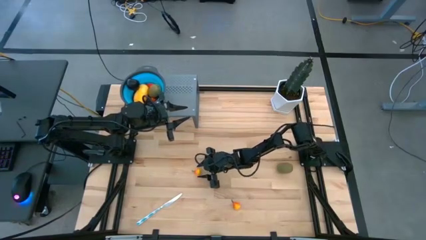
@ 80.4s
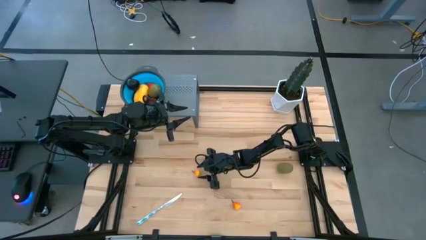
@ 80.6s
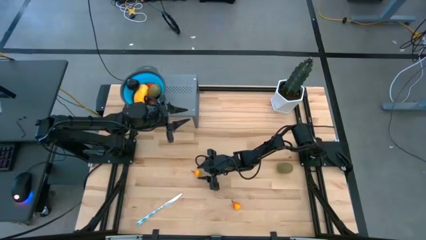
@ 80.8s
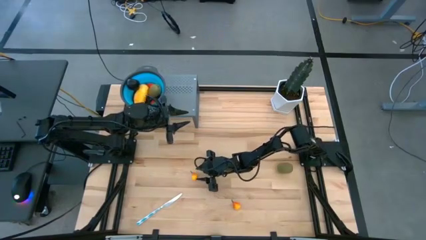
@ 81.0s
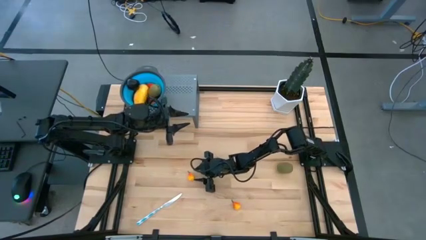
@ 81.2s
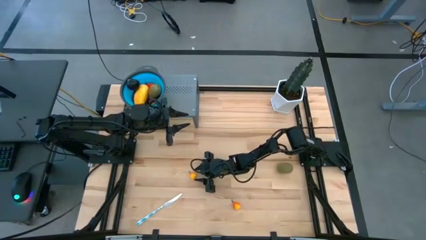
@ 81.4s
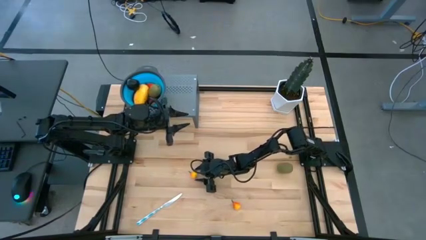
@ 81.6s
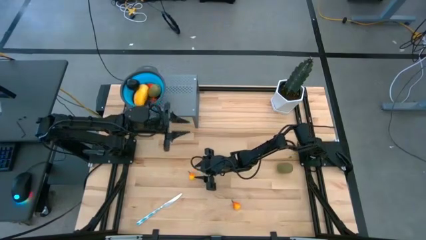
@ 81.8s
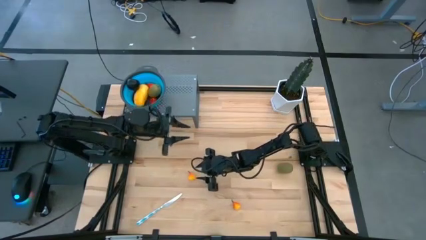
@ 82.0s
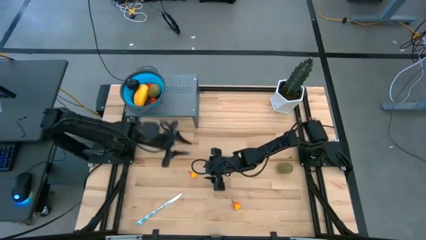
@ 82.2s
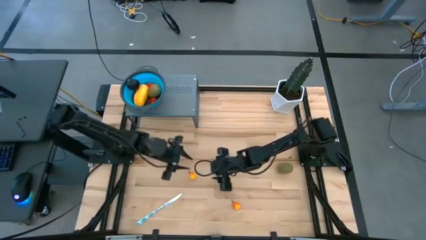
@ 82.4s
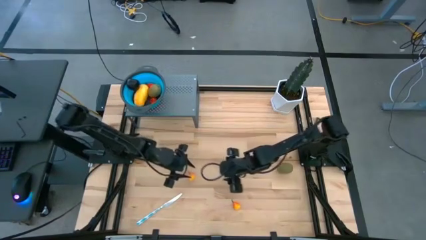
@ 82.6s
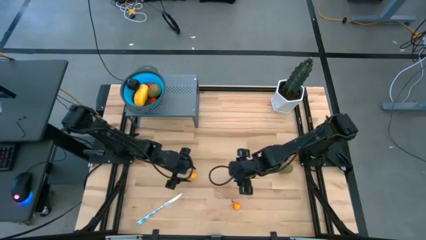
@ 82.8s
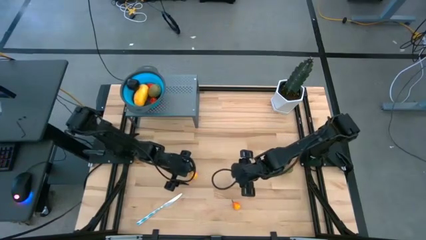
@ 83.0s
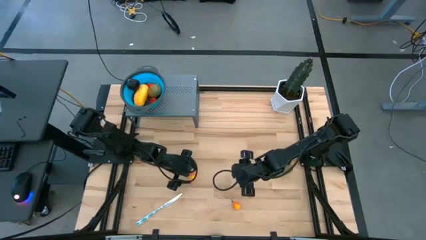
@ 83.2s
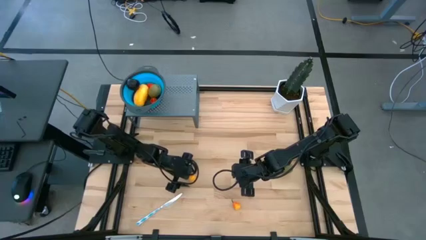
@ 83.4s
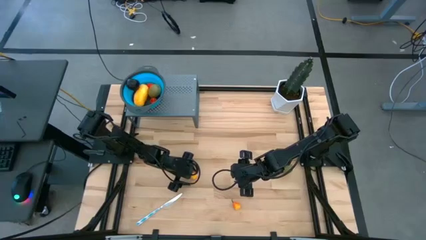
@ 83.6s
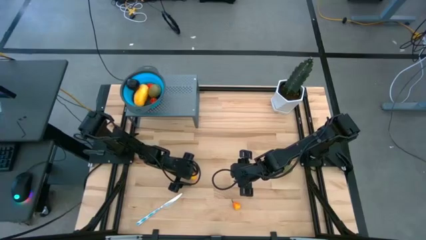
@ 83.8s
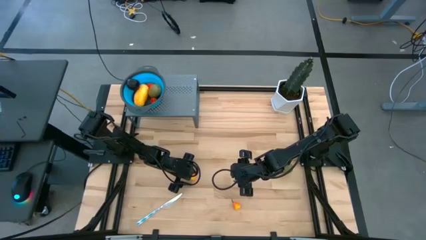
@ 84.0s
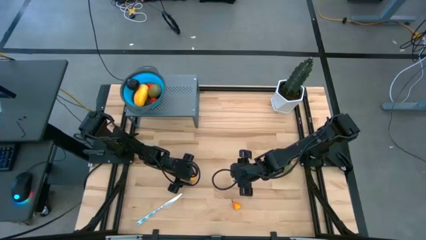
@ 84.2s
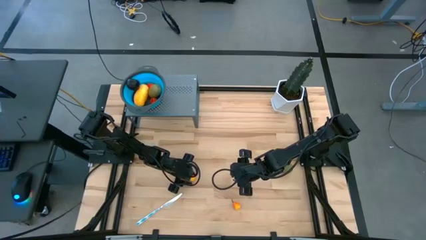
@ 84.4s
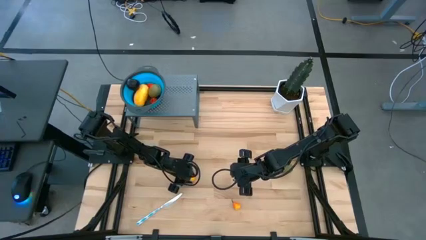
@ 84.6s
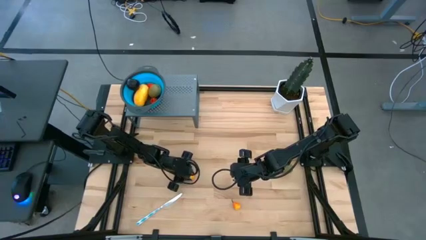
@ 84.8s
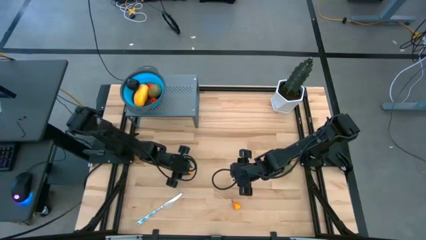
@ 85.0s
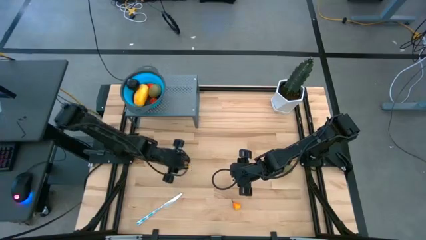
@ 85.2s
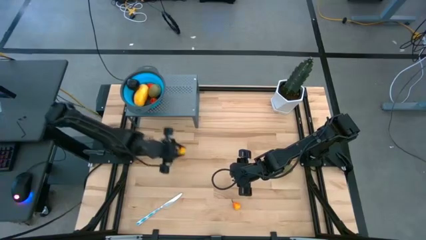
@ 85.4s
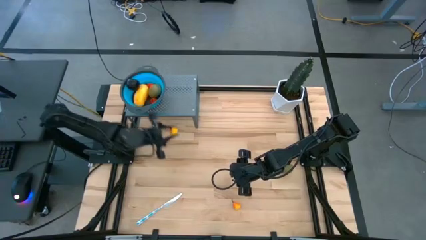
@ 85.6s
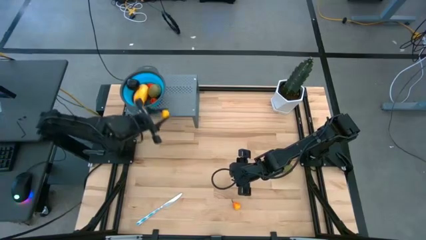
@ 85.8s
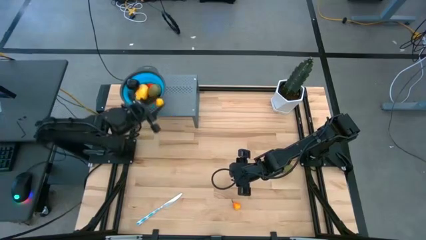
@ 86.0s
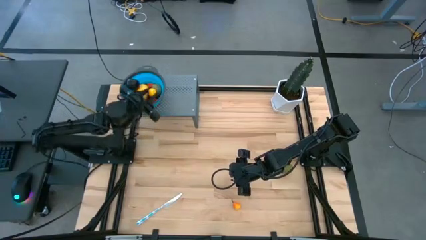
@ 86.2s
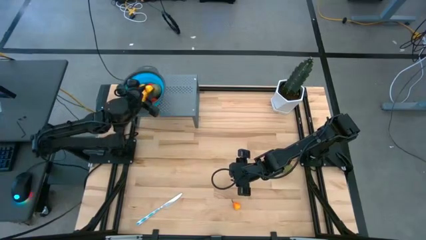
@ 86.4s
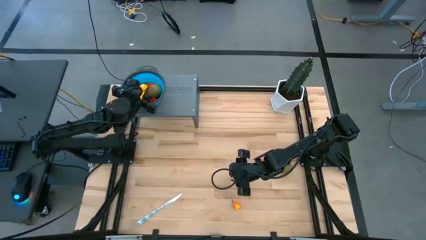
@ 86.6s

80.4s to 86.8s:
Task: Pick & Place Fruit
Put the orange pear into the blue strainer bowl on the shelf

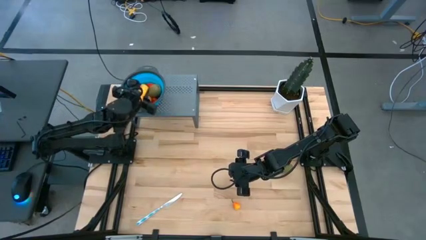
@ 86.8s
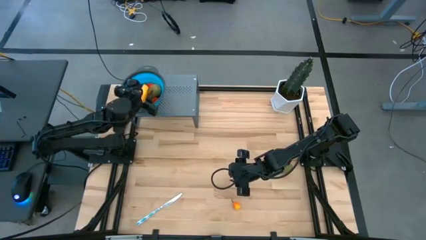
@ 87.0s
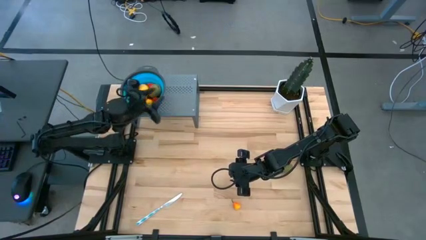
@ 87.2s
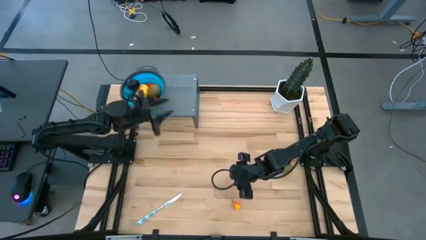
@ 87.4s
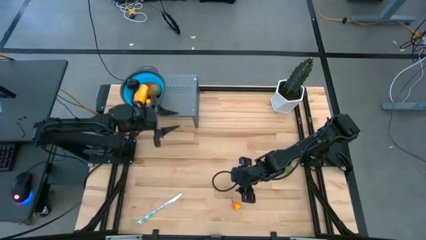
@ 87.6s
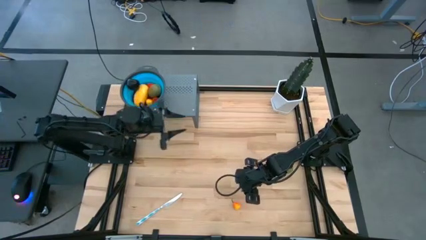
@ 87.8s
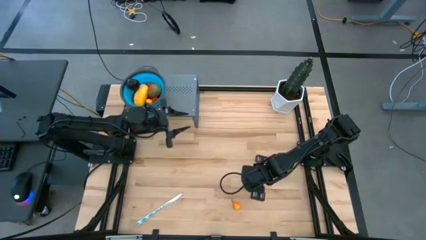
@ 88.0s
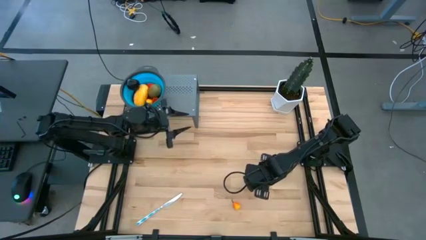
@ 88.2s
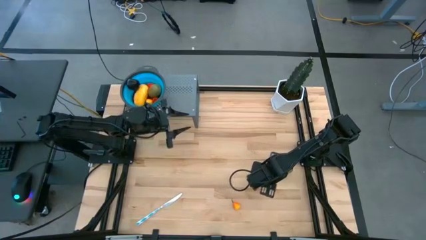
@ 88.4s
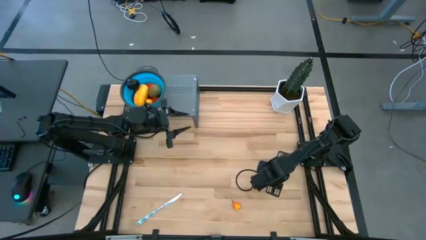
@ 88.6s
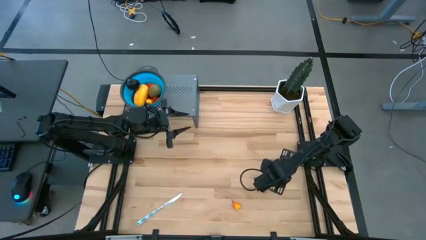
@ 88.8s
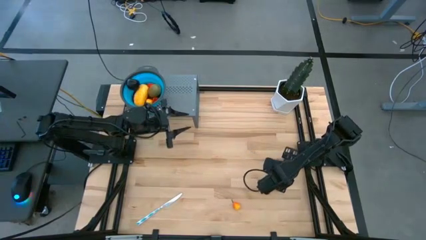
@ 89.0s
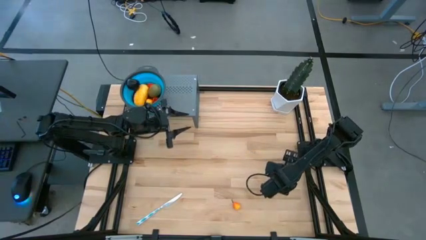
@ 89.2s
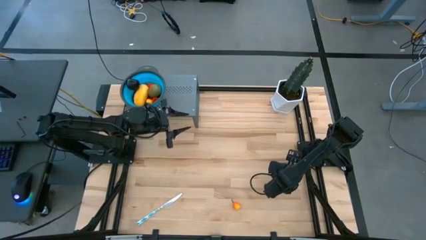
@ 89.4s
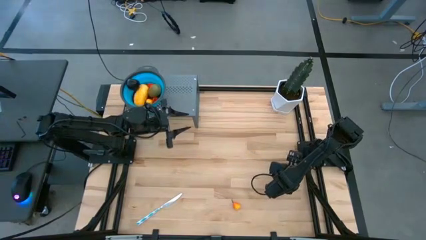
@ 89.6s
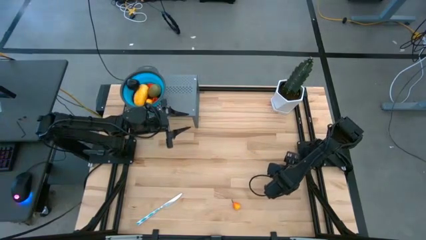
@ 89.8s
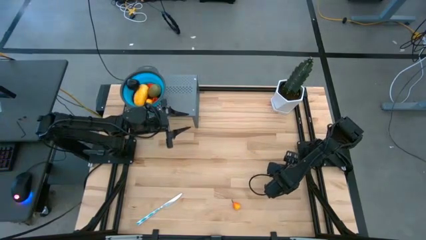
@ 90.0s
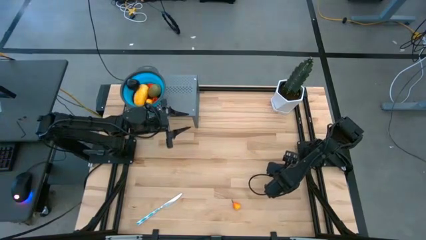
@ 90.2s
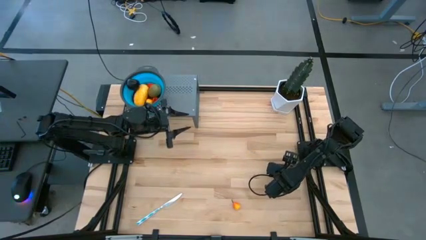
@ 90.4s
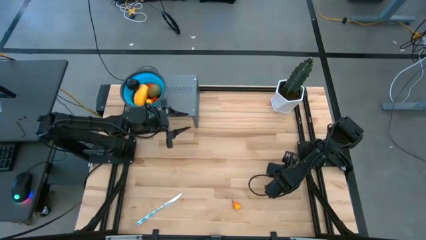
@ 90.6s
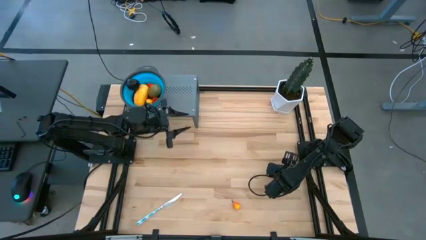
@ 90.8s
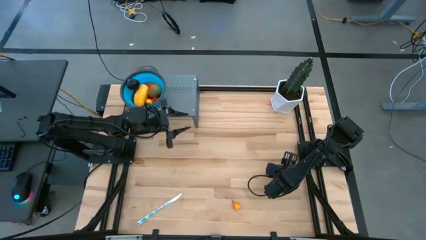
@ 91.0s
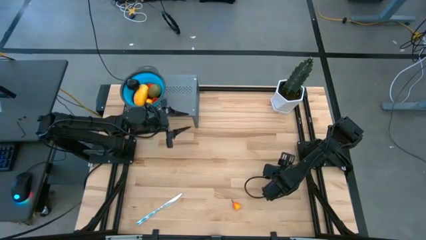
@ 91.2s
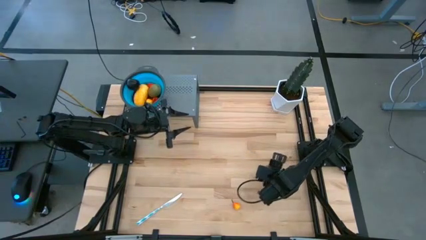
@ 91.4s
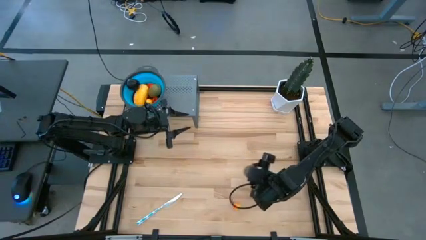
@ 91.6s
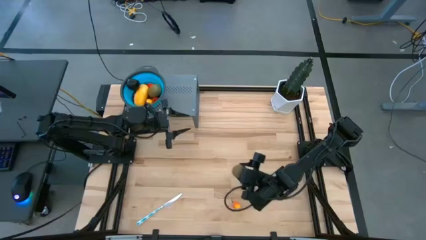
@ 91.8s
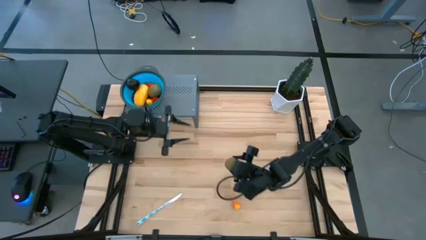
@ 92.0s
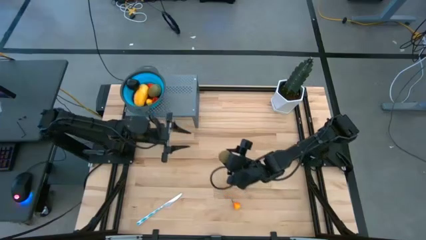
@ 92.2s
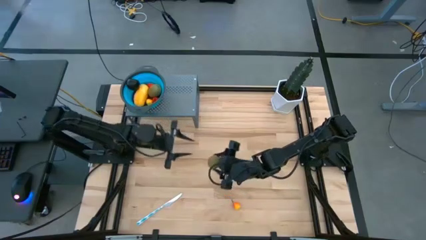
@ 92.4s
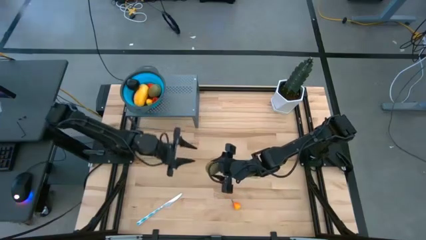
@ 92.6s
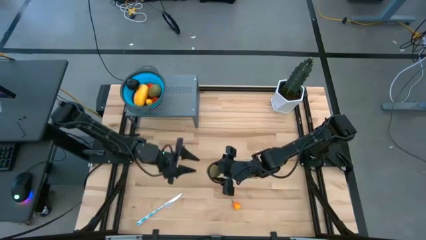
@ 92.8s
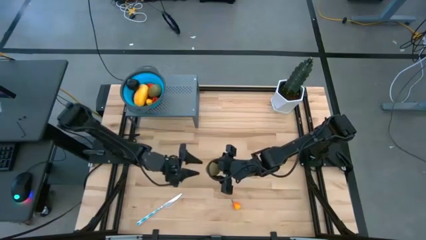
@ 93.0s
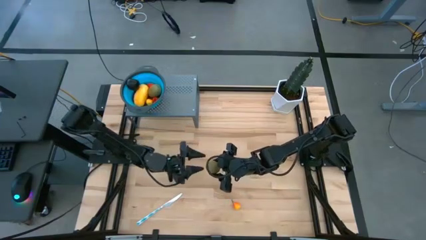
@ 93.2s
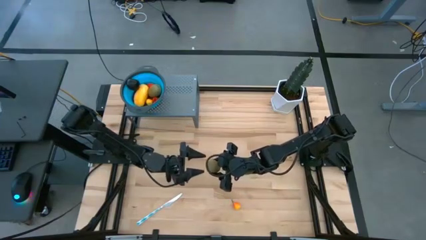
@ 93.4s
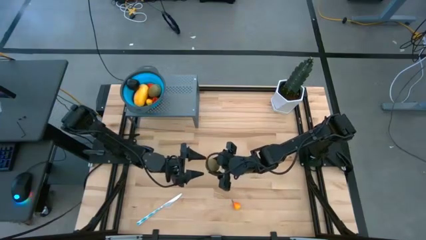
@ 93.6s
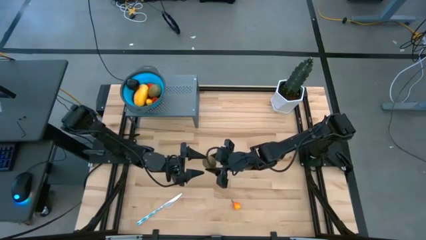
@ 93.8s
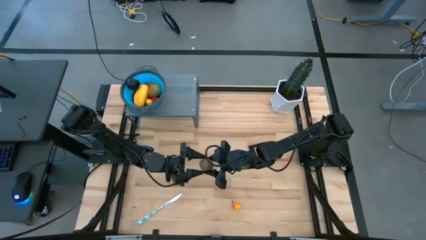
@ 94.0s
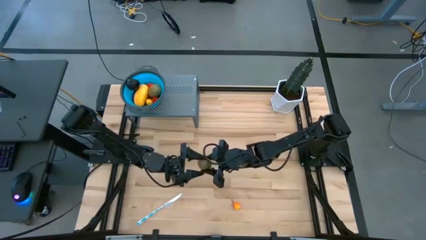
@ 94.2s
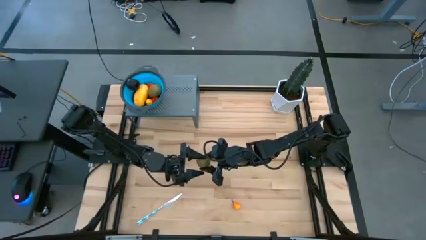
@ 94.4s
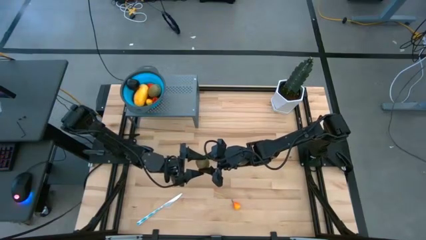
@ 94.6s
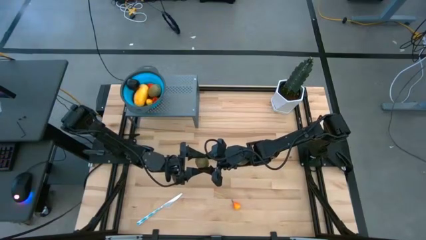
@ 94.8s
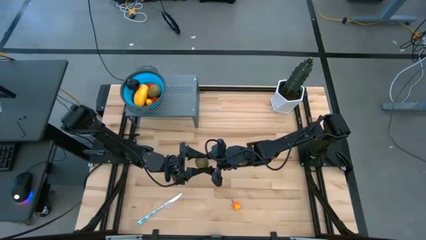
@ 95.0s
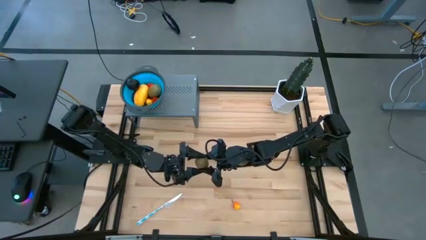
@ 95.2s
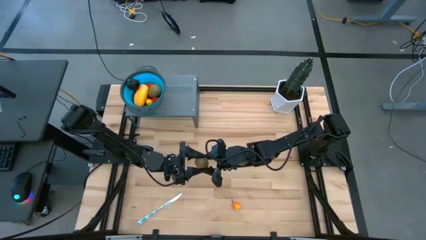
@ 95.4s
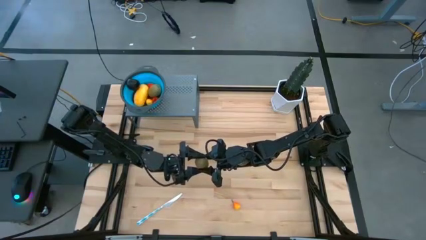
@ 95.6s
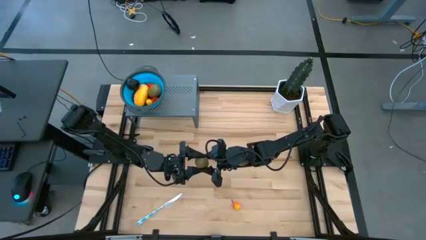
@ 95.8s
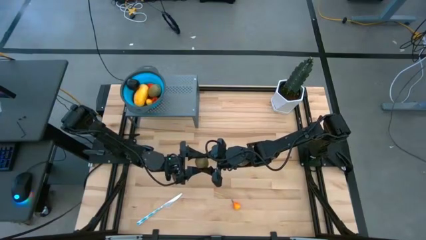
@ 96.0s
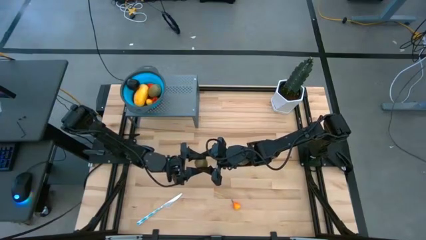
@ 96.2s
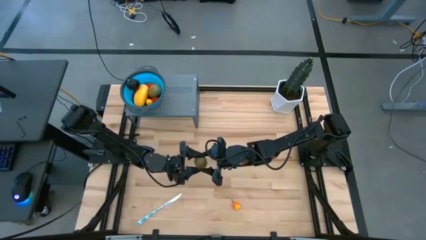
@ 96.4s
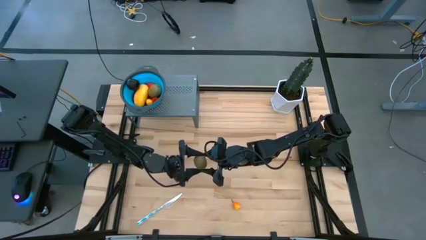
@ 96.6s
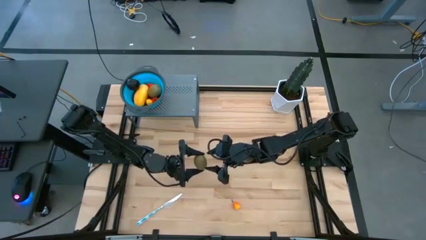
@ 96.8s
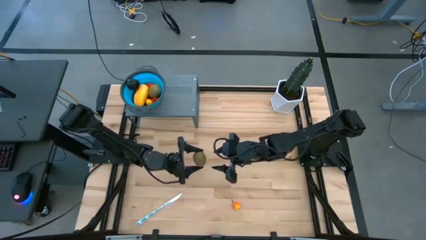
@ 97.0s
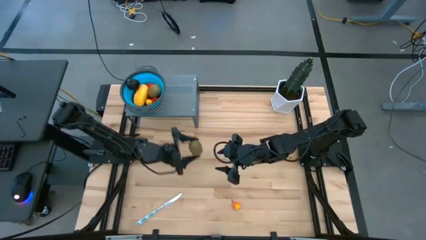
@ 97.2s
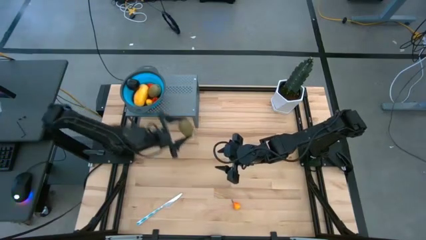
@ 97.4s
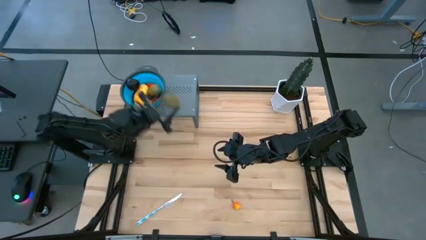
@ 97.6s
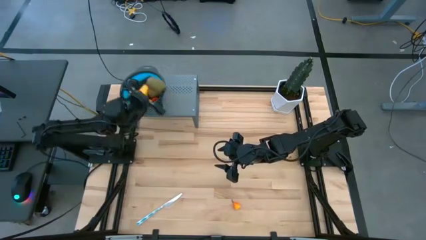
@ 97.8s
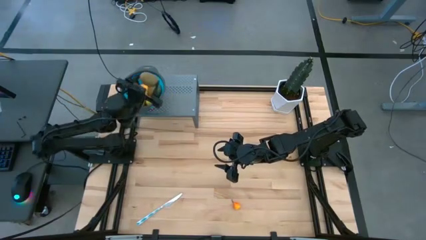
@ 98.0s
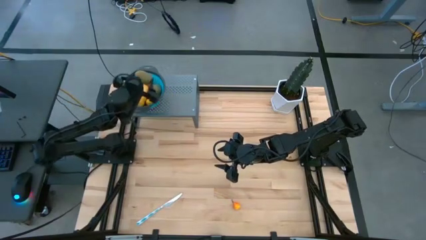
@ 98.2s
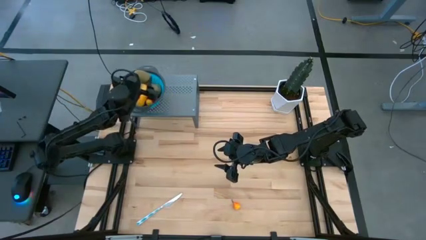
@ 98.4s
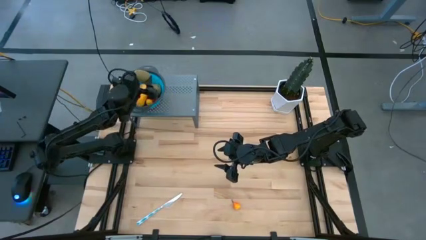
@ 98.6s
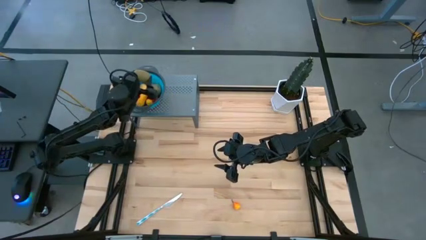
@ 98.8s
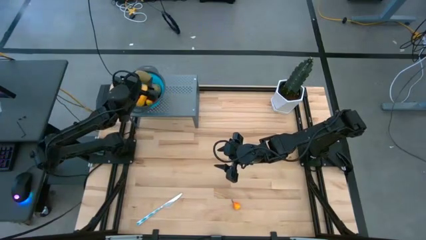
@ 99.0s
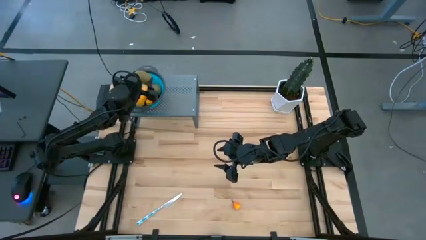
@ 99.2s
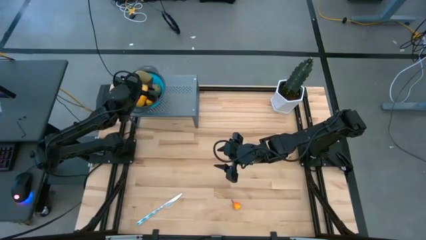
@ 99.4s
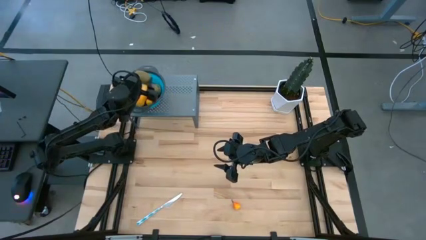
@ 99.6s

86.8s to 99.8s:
Put the brown kiwi into the blue strainer bowl on the shelf
